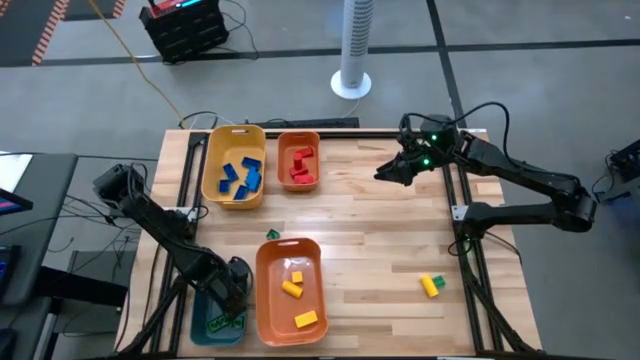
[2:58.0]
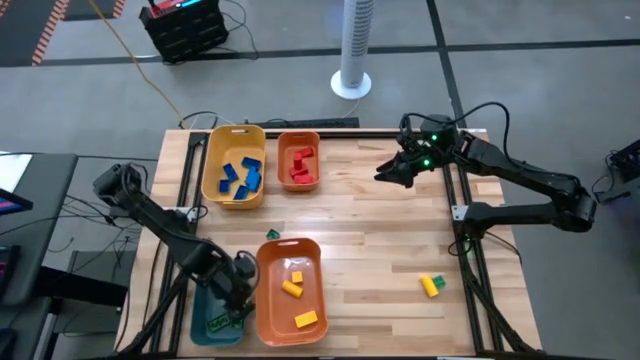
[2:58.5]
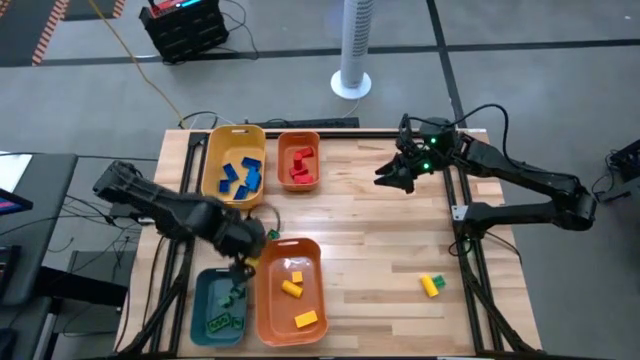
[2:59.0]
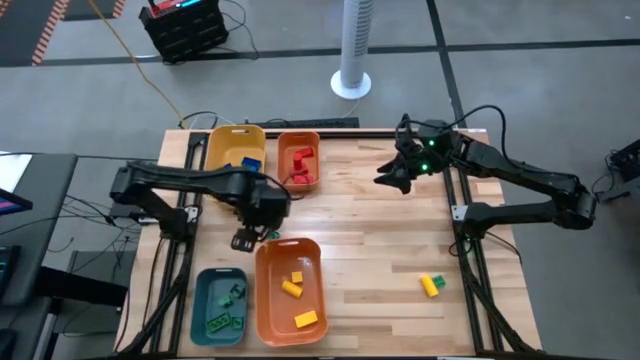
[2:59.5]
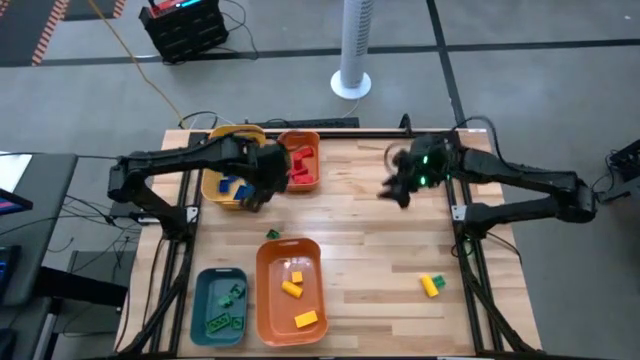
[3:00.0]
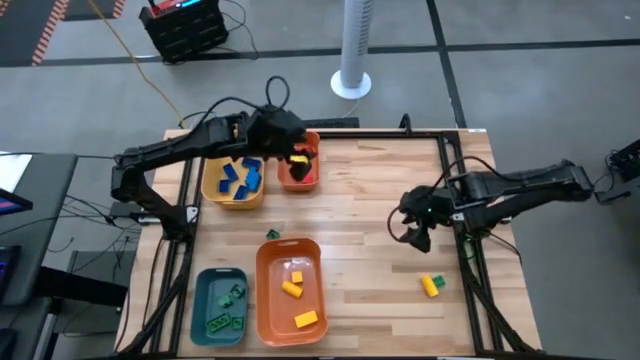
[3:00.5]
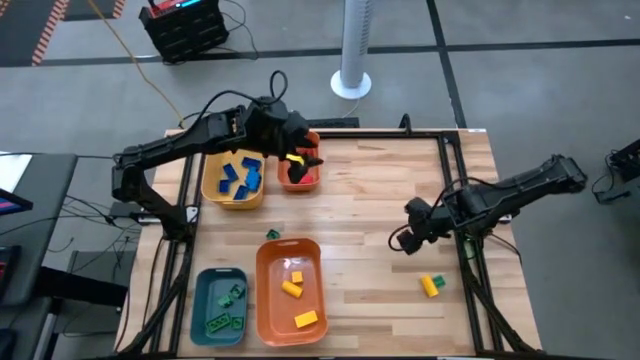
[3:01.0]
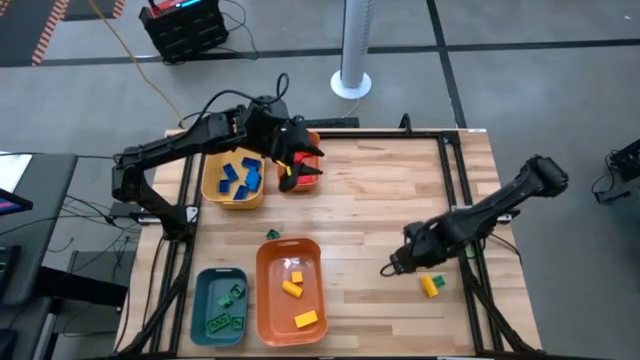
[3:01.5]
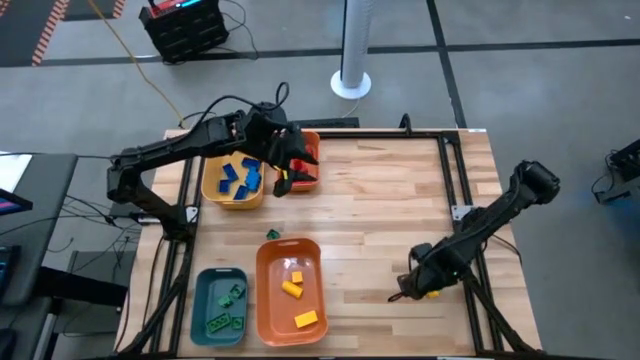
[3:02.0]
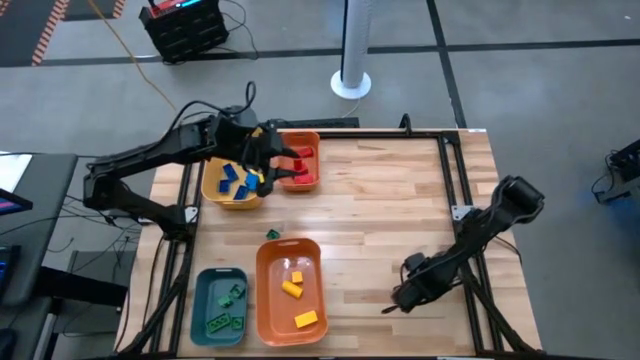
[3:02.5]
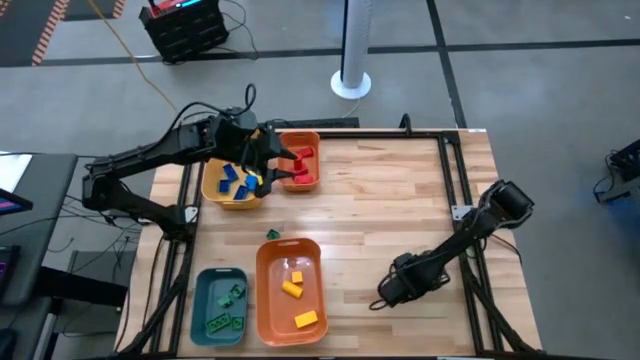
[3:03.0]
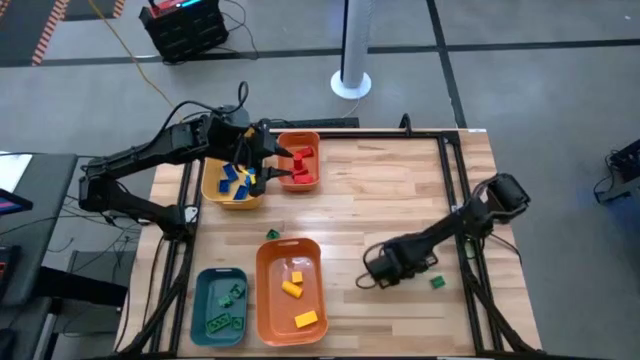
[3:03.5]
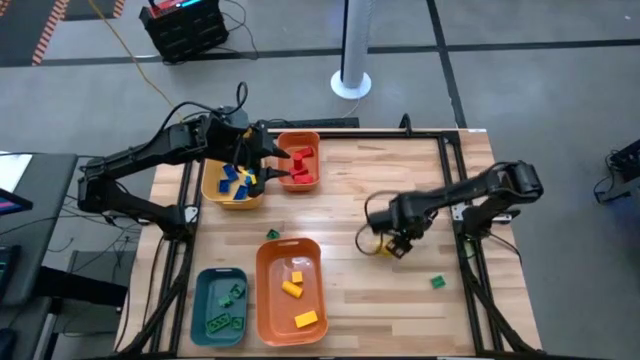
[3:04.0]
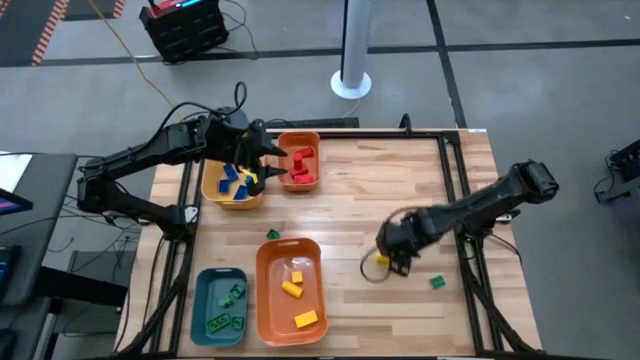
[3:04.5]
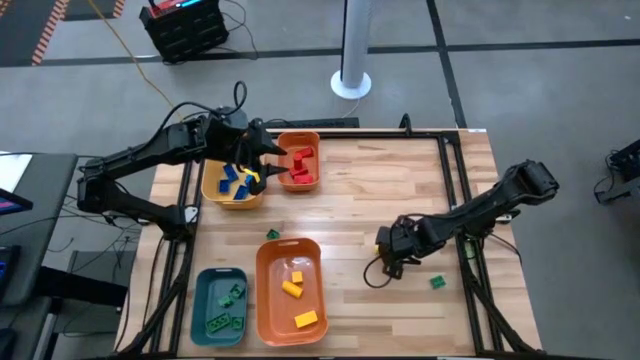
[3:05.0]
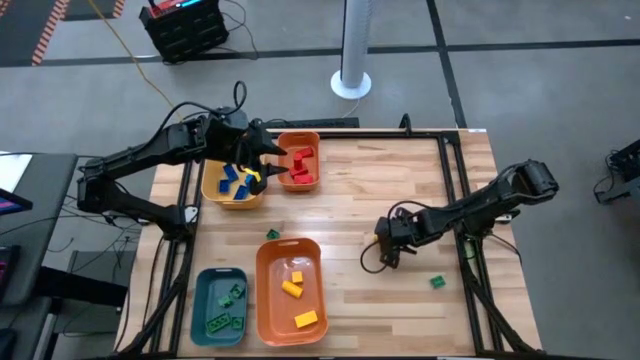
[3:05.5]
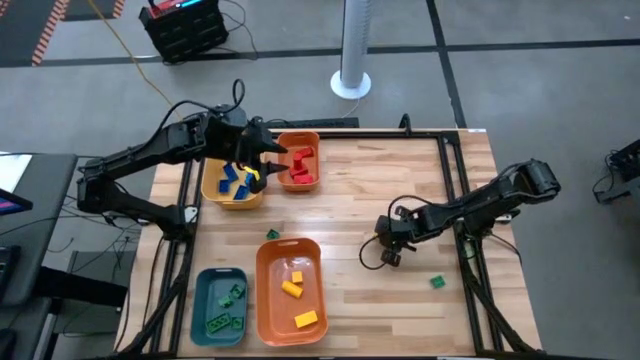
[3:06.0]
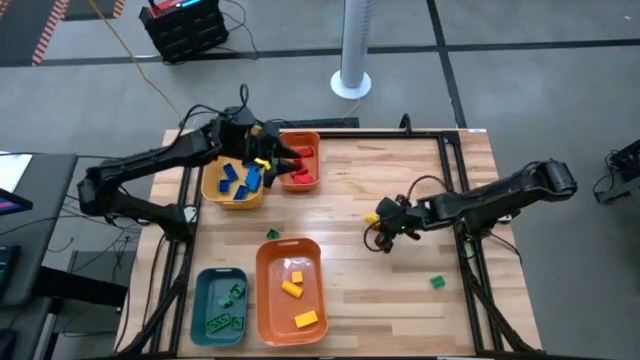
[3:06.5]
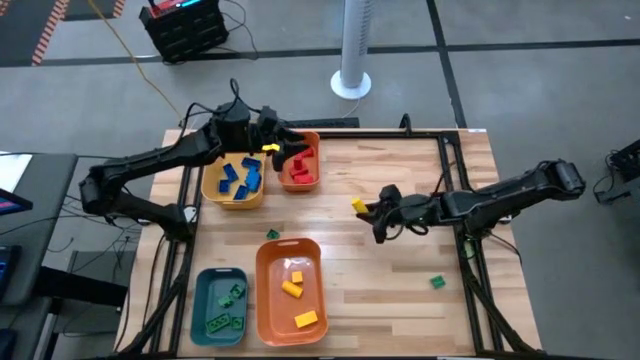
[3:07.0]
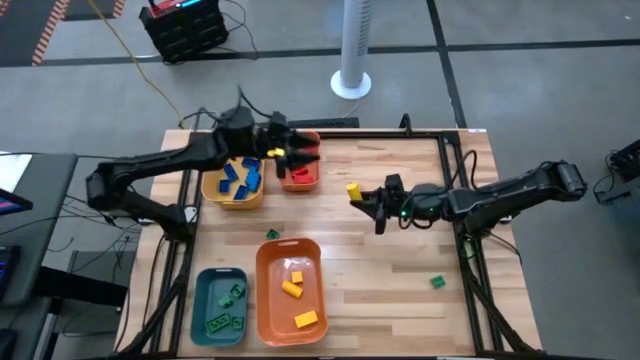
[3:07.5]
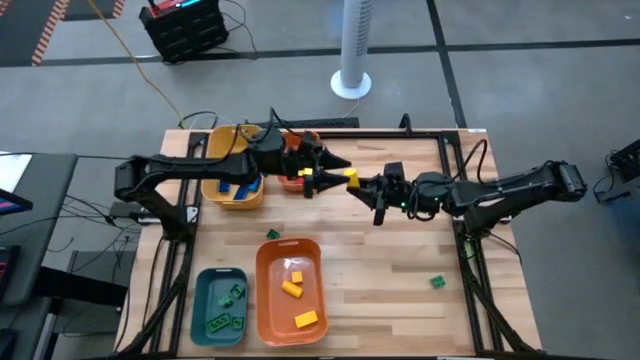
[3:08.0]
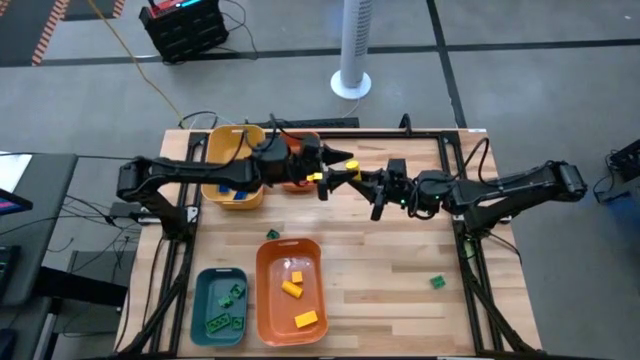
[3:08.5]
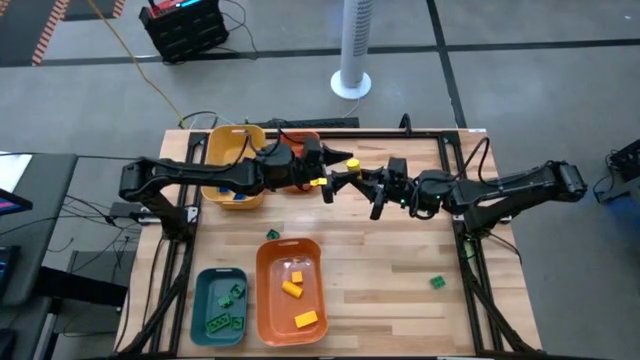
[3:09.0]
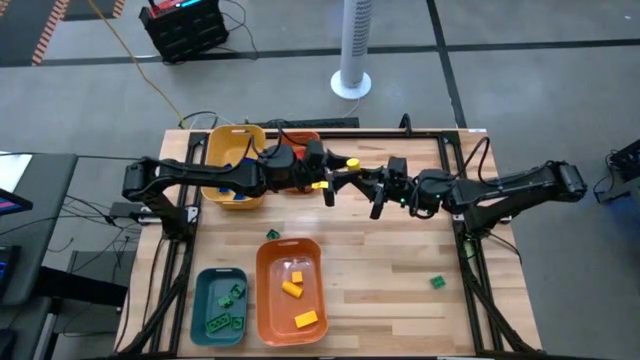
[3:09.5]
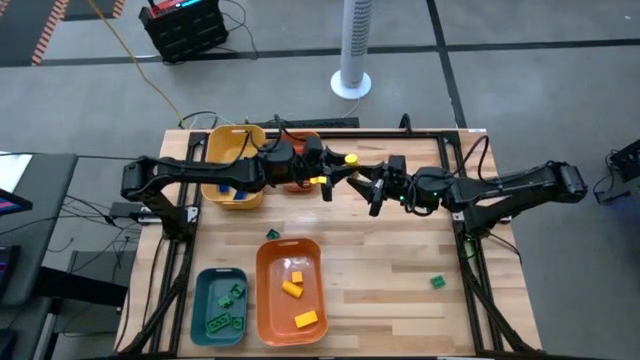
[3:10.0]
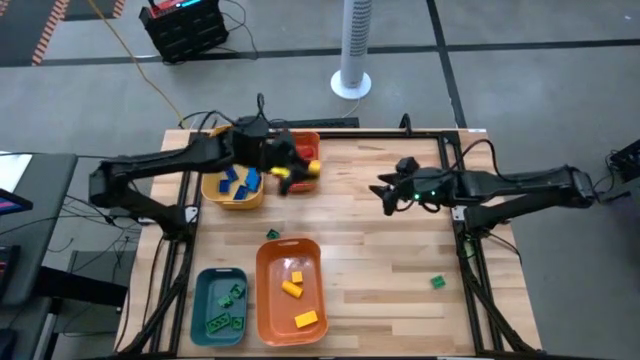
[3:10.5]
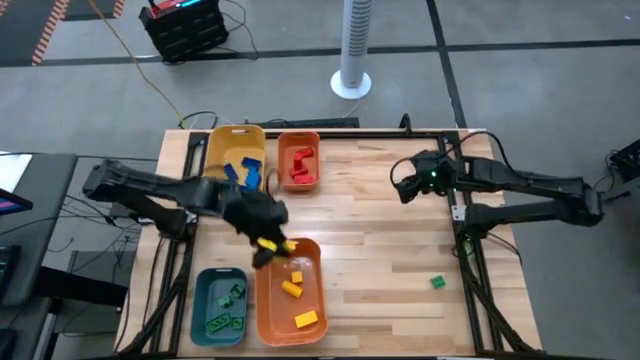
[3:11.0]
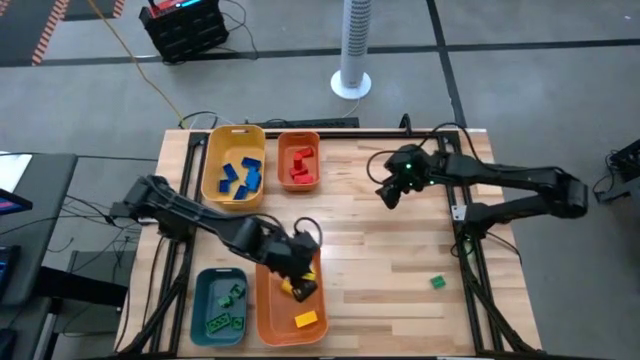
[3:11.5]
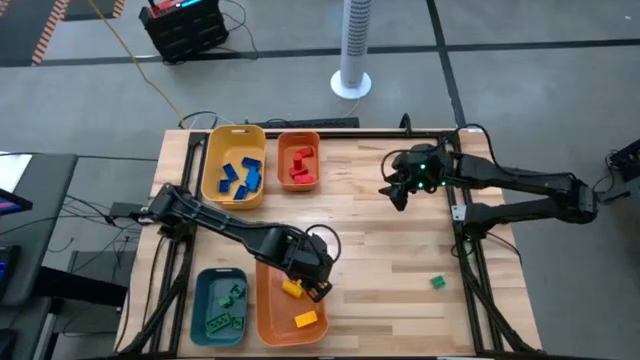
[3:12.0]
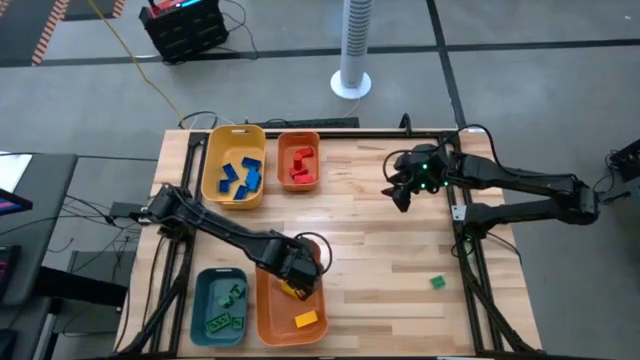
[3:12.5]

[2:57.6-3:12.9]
Task: Sort blocks
Put the yellow block into the bottom orange bin

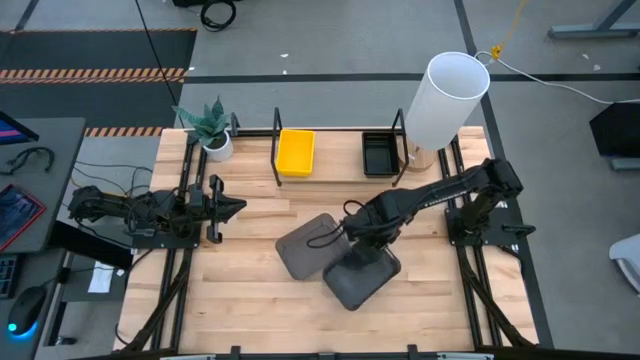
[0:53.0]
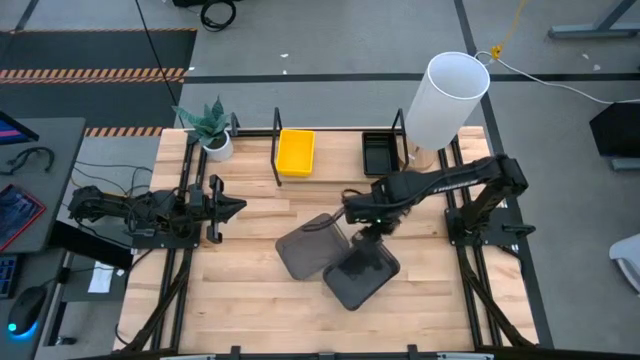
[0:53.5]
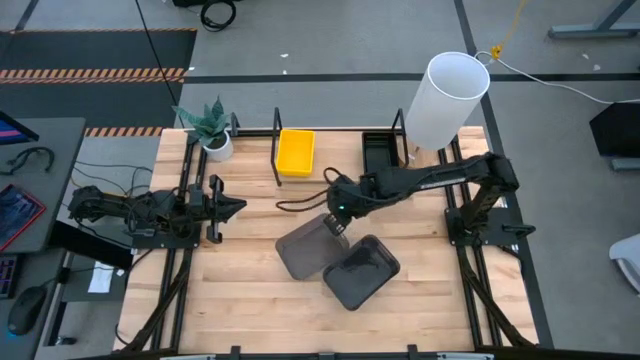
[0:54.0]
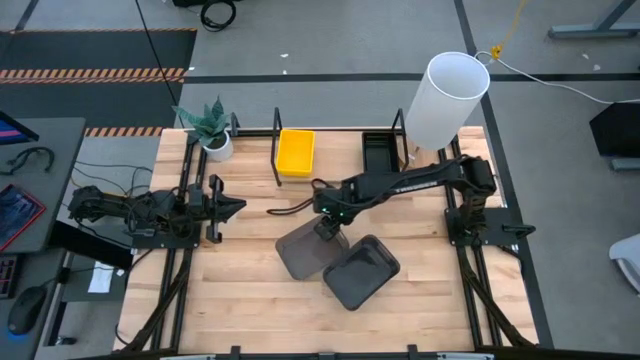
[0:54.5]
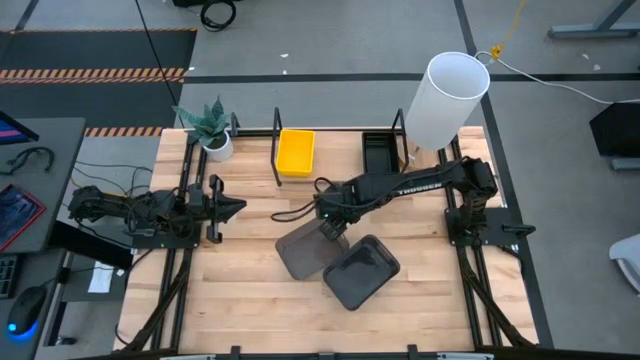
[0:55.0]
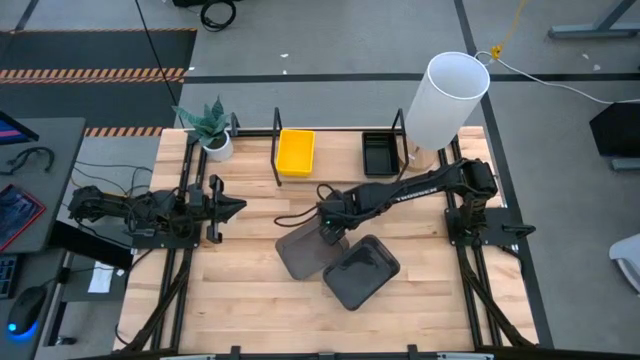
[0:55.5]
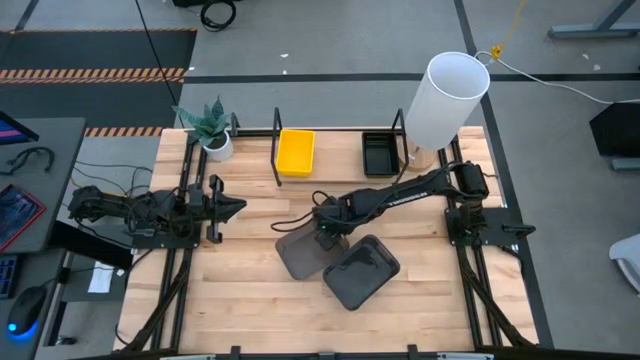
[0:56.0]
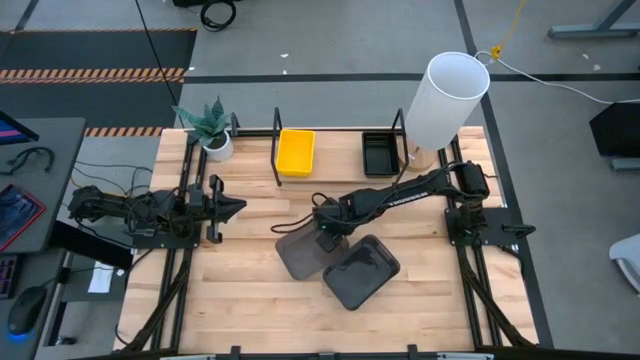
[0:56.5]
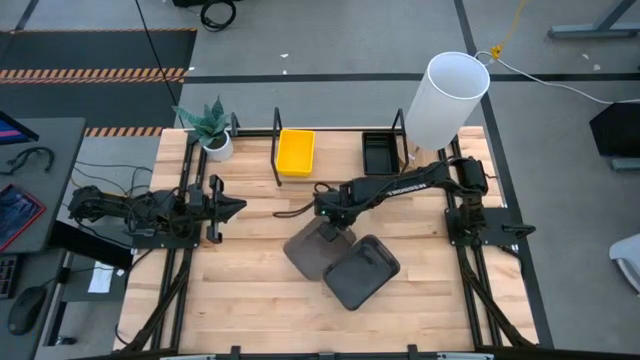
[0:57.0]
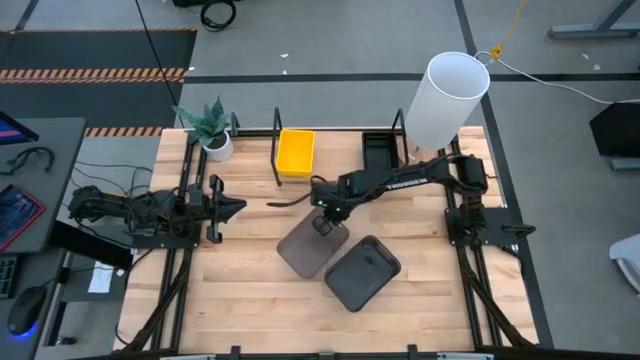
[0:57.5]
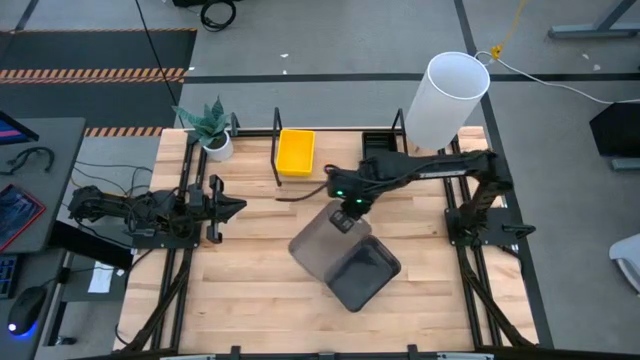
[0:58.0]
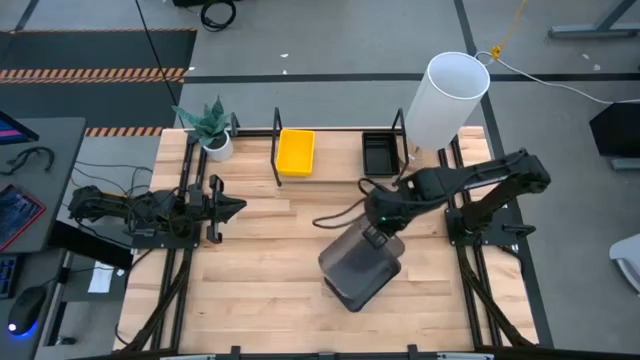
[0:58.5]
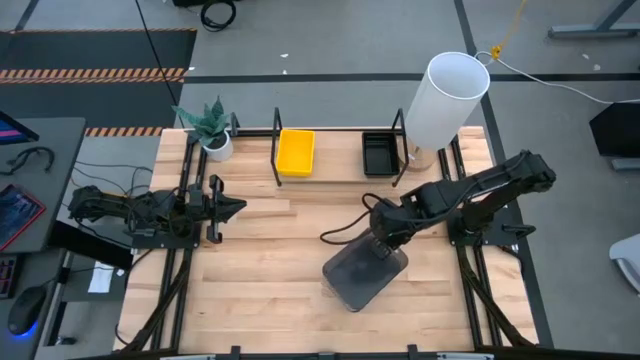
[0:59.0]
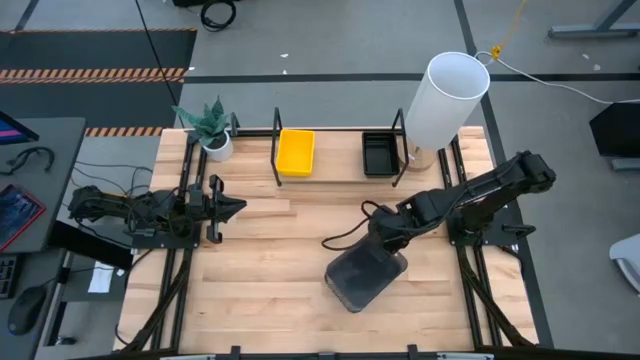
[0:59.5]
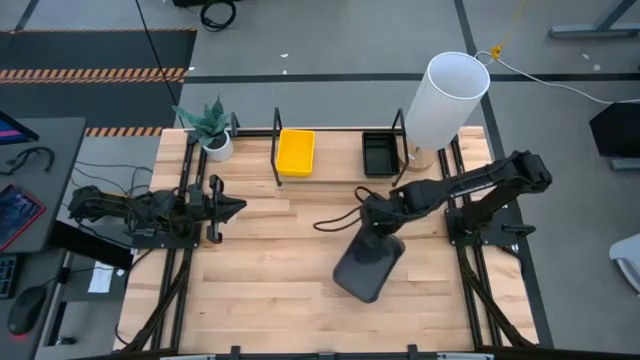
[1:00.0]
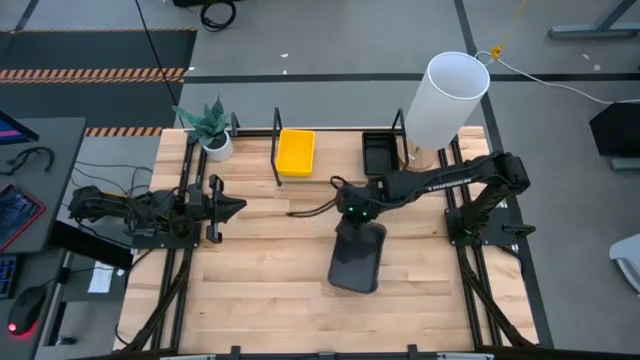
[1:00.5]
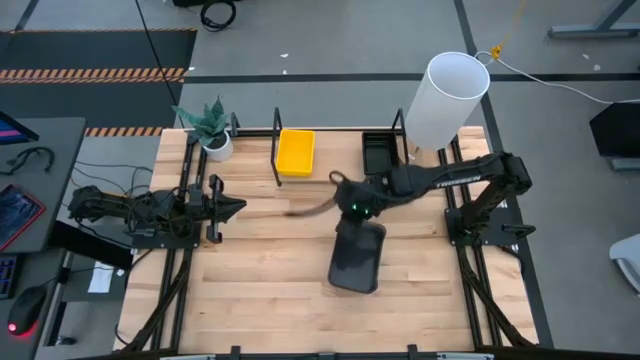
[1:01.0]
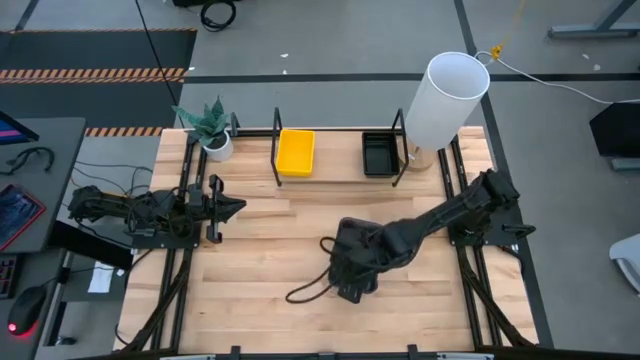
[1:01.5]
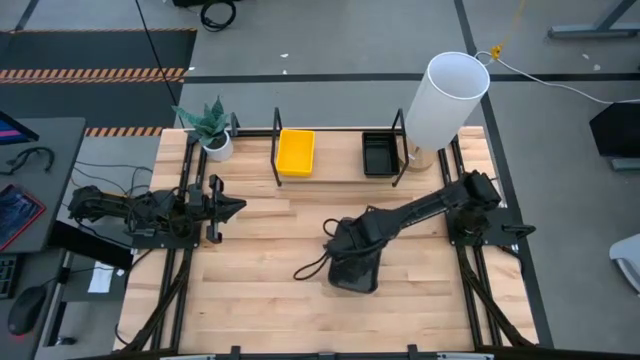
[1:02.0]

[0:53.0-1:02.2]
Task: Stack baskets on shelf by color
Stack the left transparent black bin on the right transparent black bin
